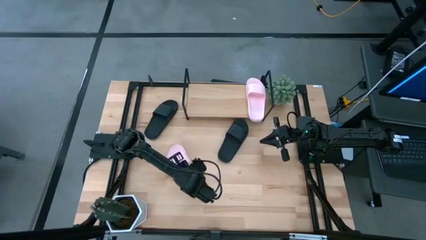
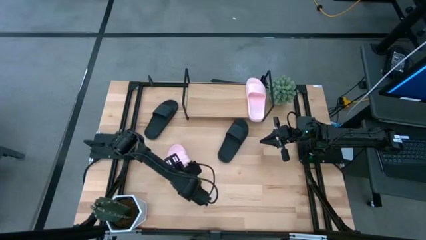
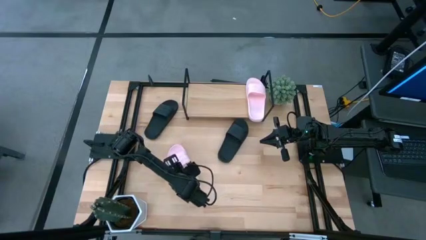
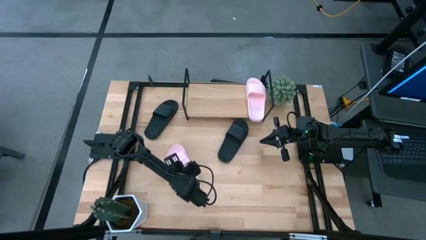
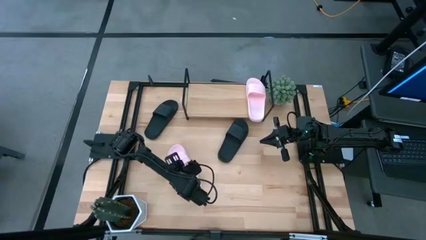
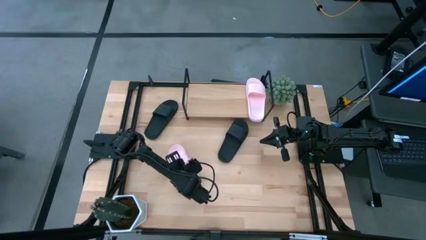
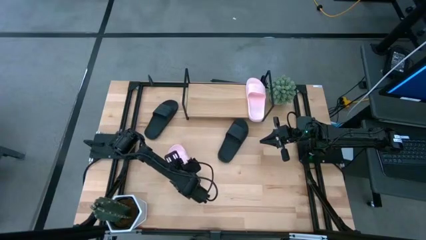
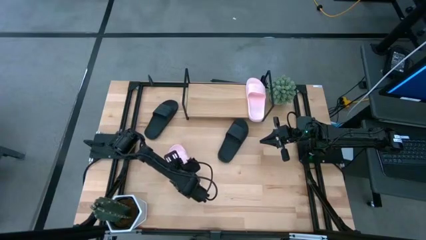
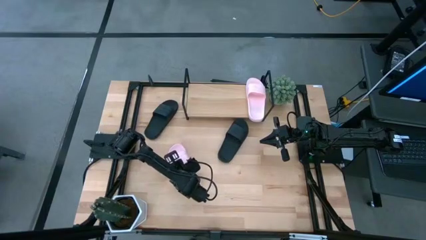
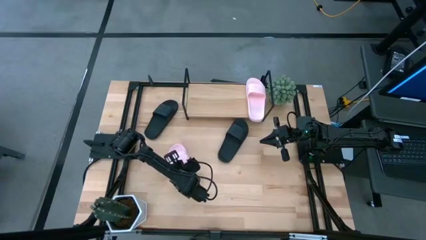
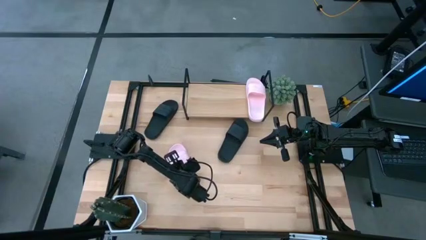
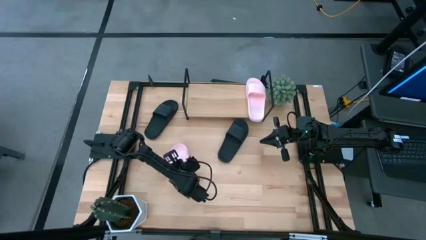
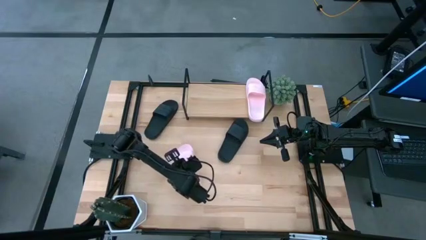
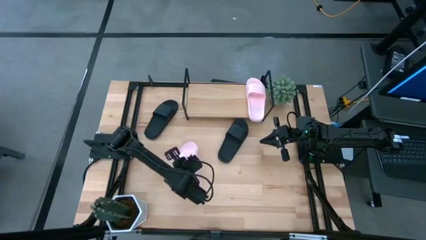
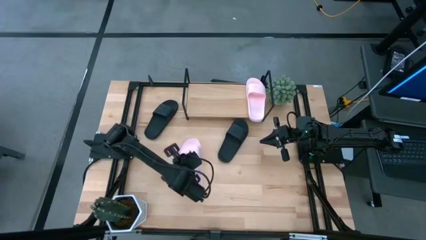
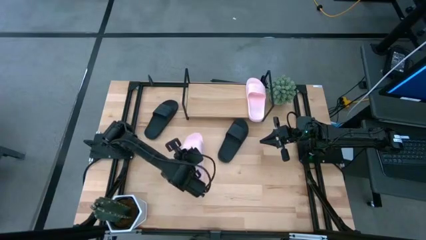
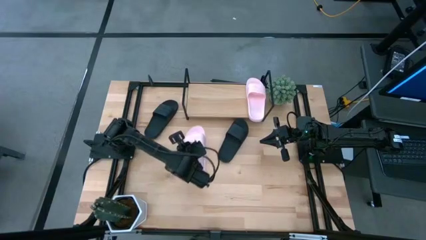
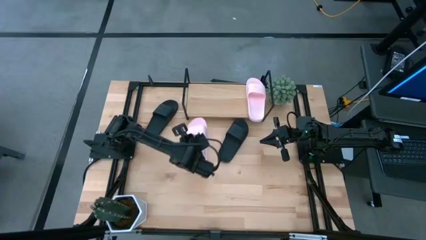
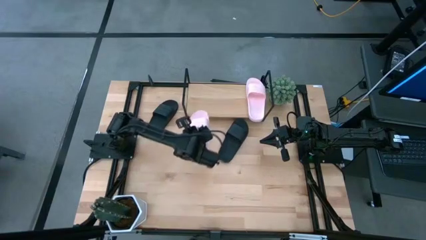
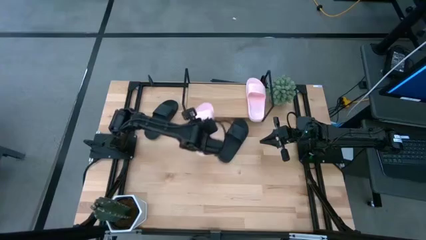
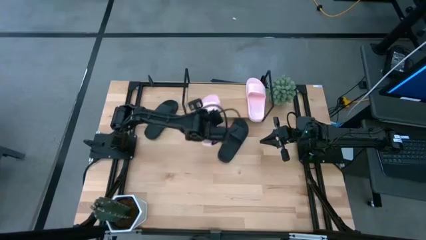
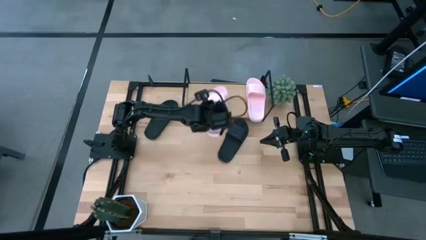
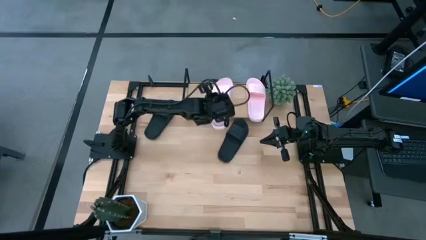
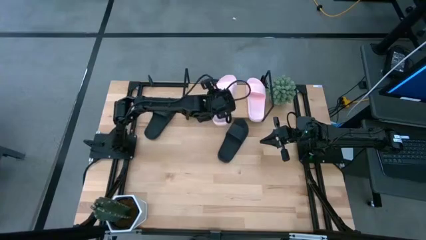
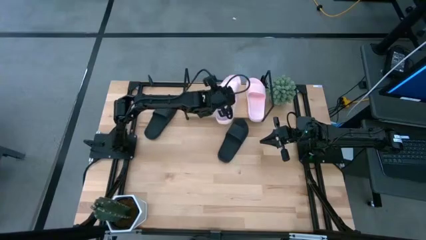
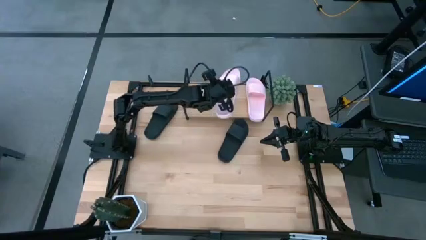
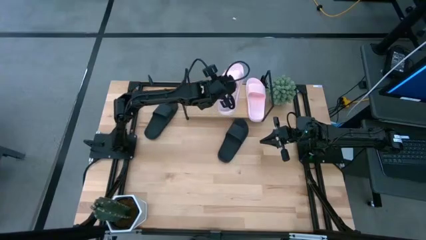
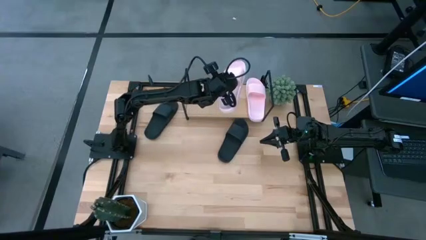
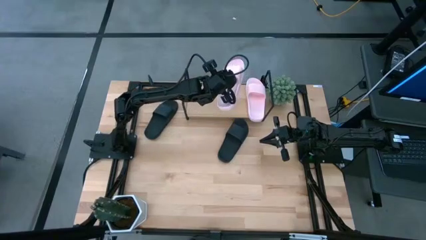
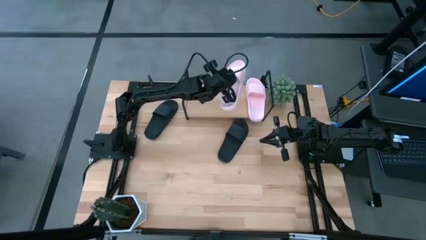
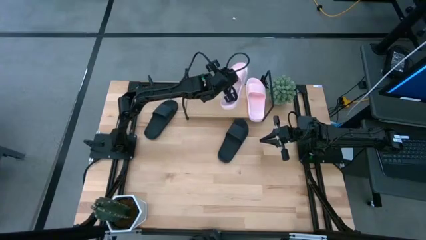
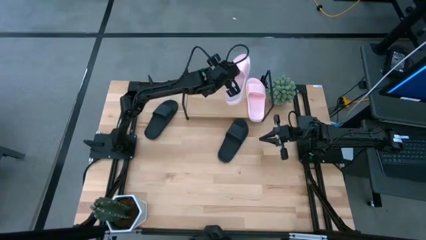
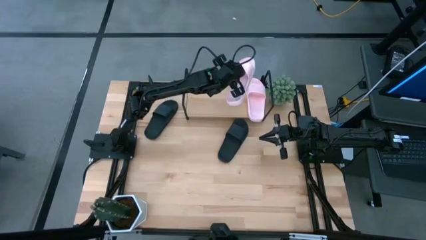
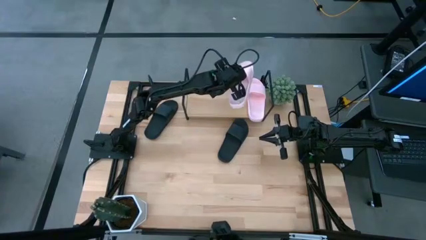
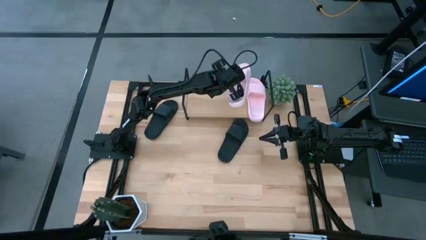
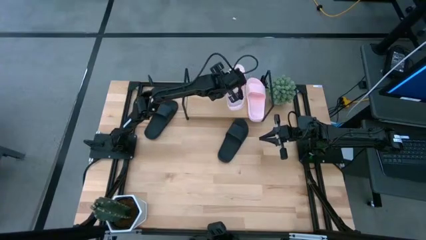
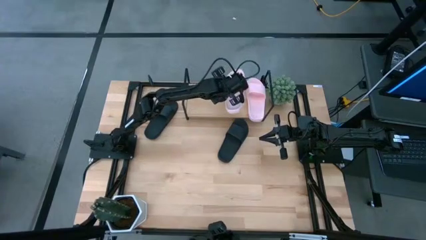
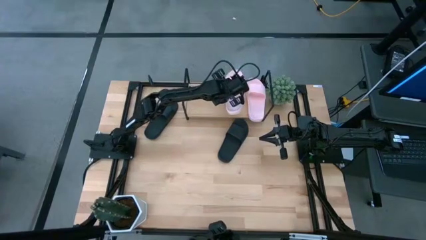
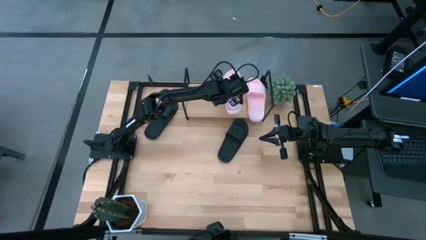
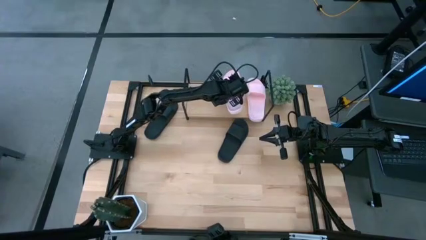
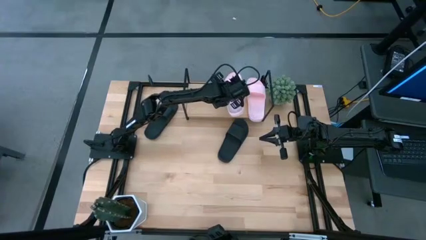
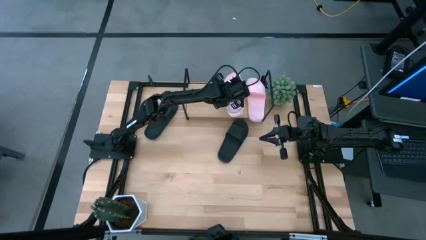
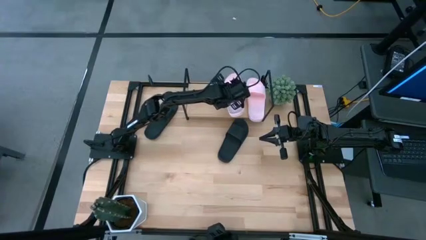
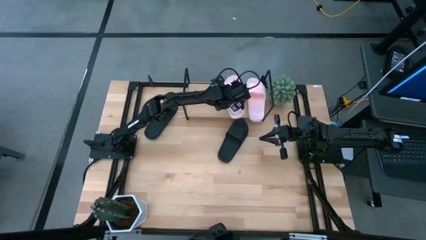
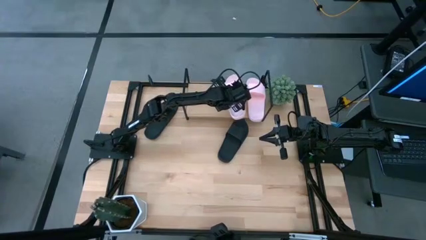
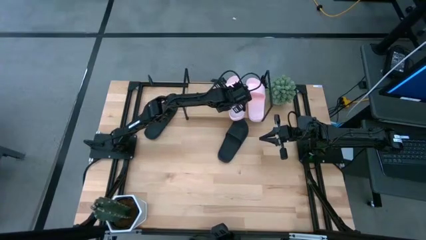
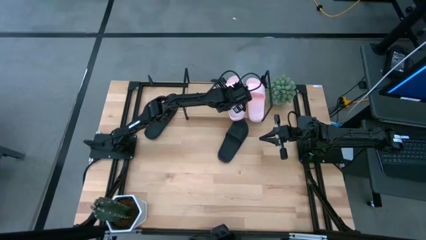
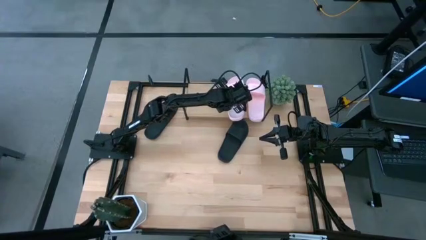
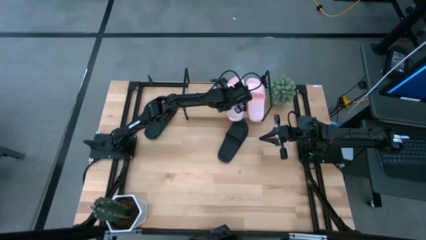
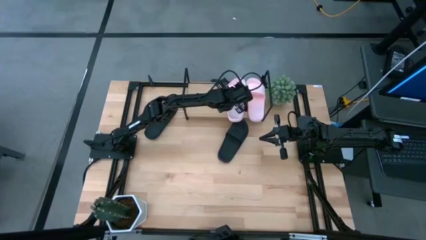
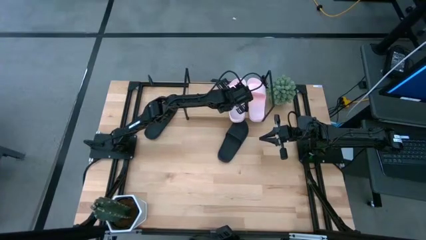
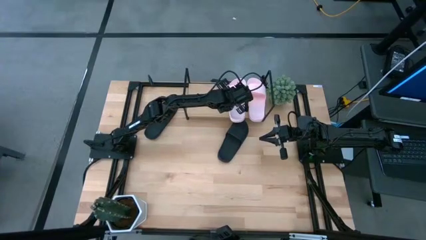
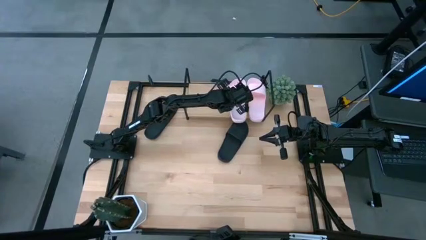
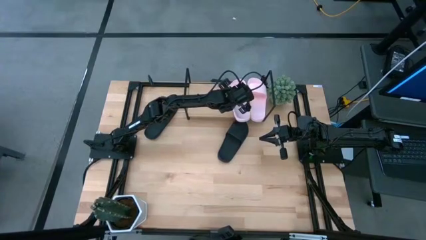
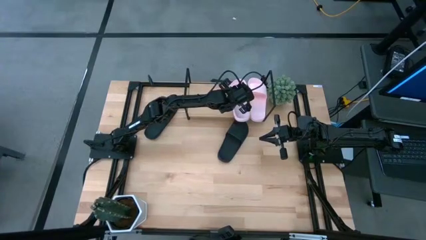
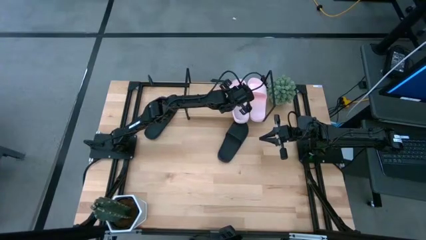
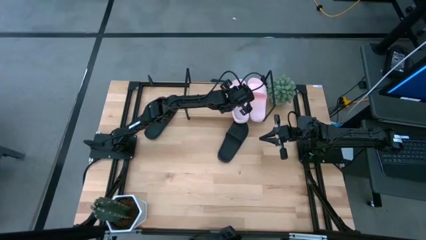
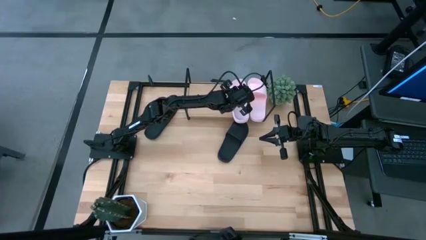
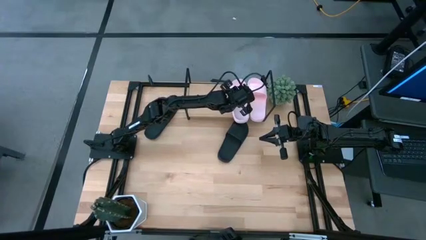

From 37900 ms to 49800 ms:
Task: Pick and place slides into the shelf
Put the pink slipper on the shelf

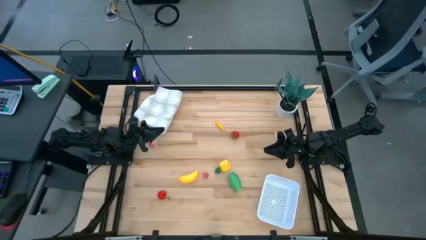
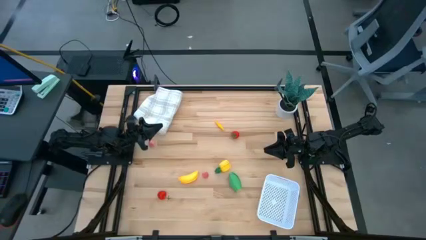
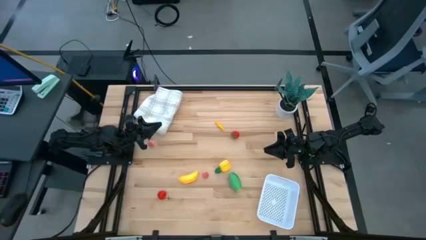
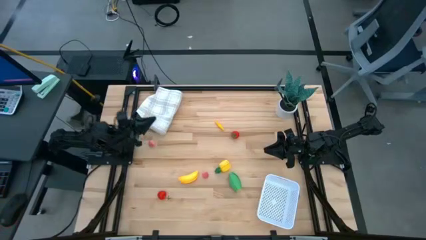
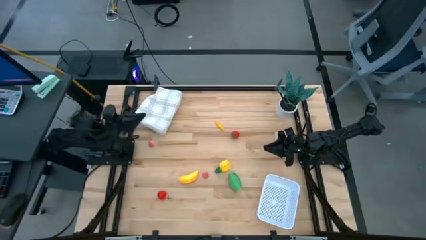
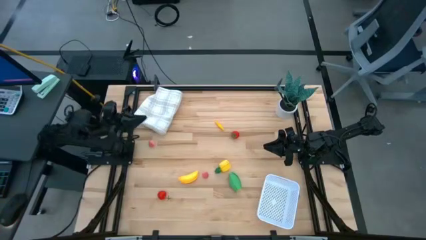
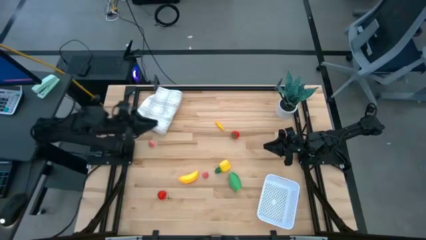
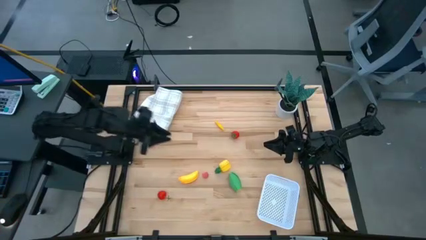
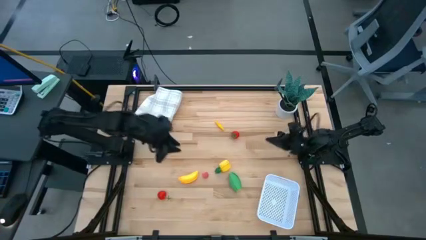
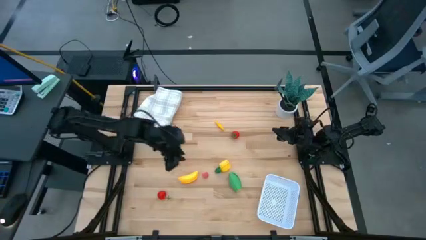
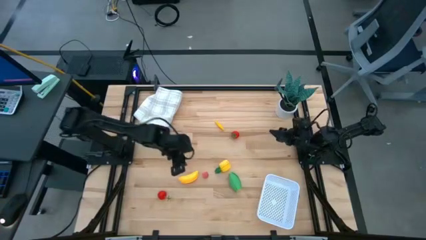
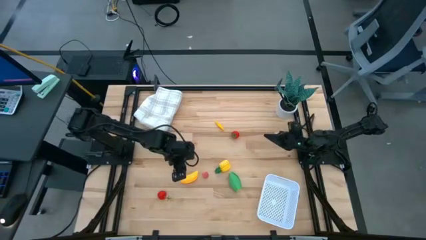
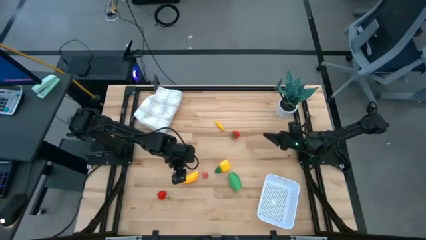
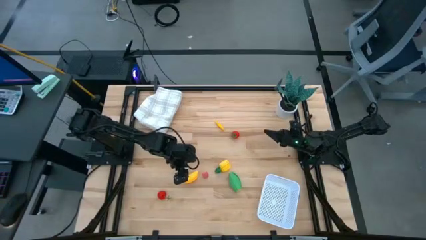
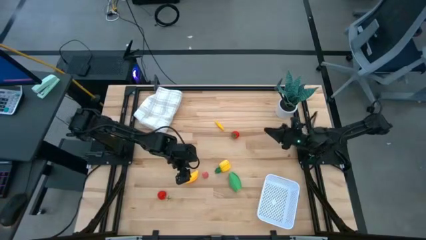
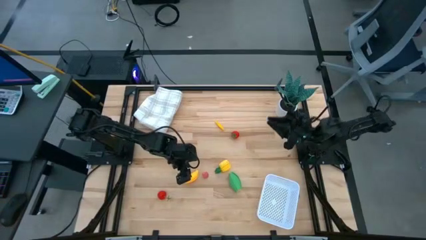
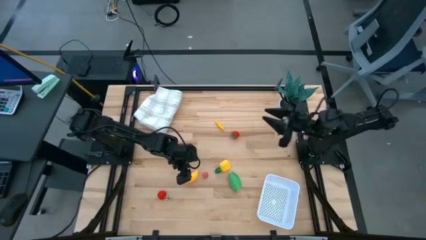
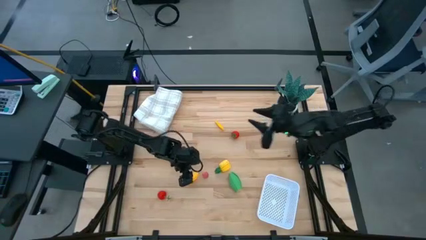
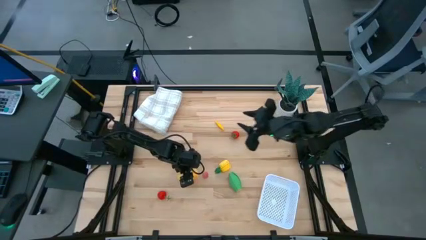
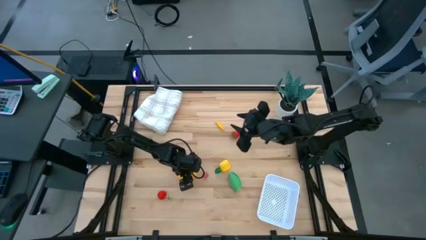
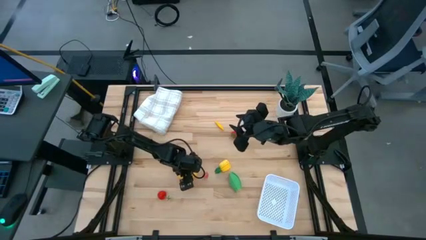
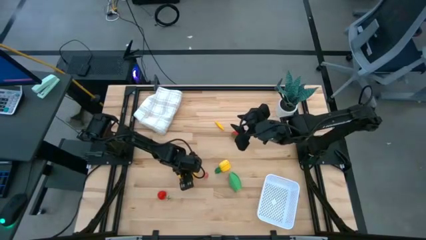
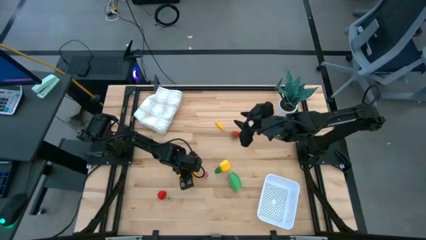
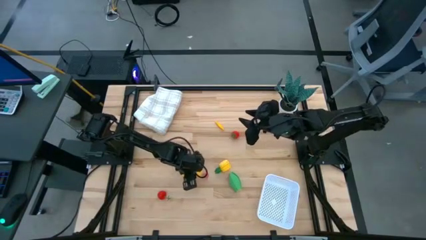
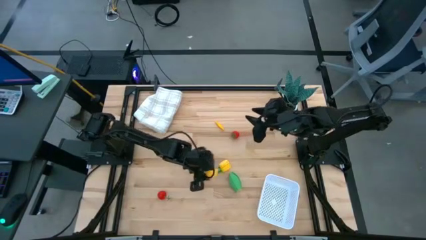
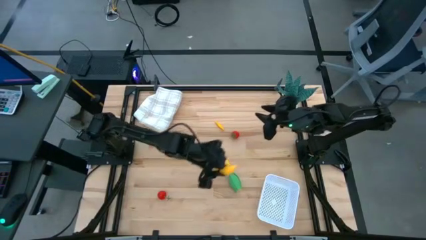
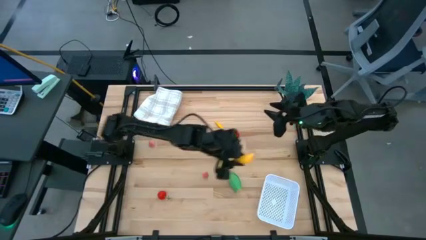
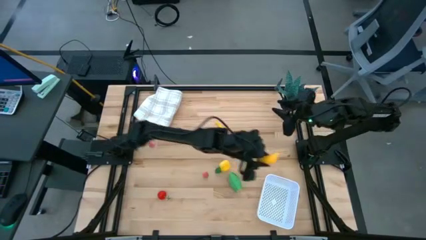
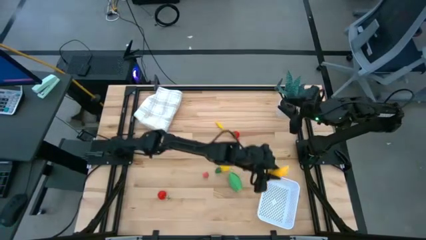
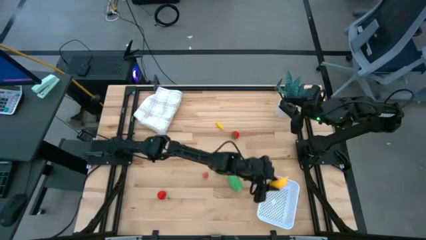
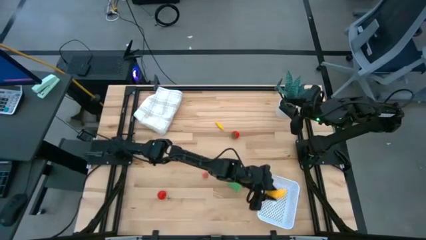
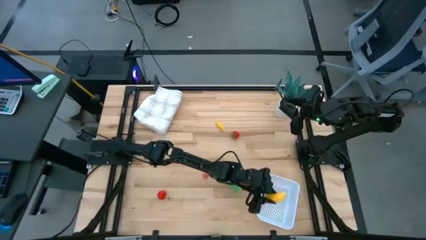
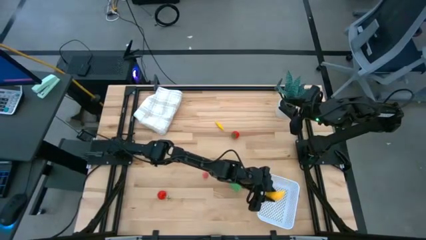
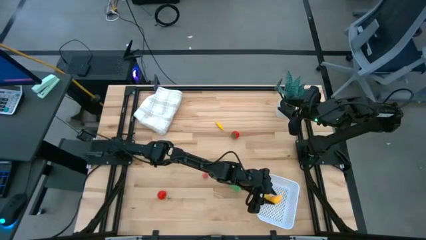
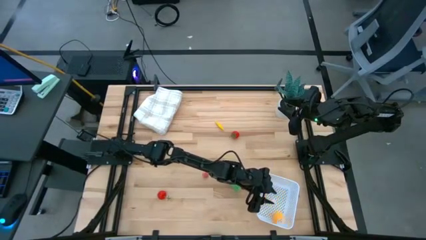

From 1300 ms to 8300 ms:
Task: Pick and placing Produce into tupperware
Put the yellow banana into the white basket
